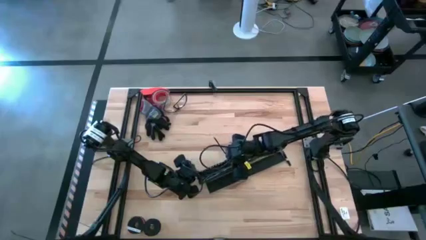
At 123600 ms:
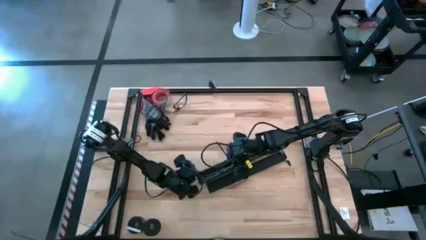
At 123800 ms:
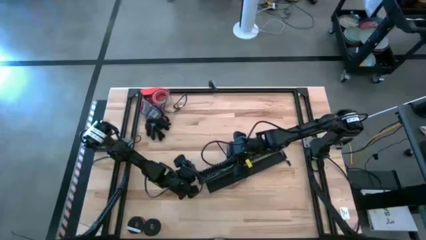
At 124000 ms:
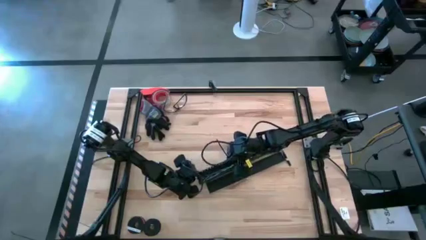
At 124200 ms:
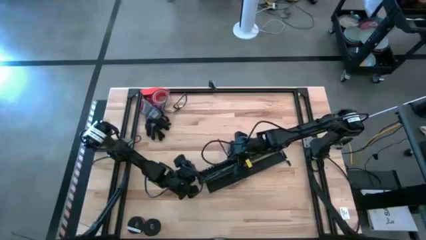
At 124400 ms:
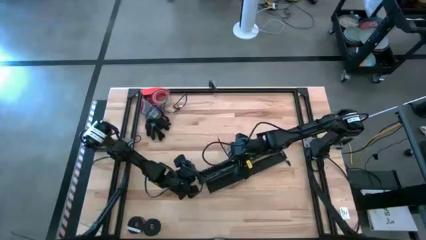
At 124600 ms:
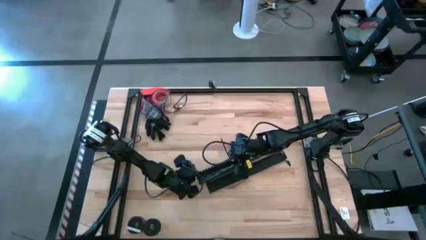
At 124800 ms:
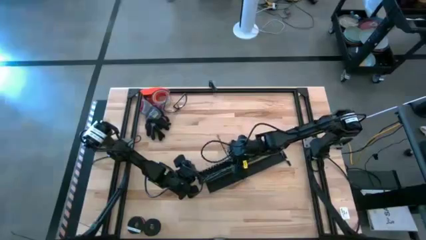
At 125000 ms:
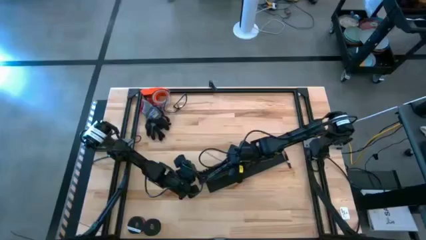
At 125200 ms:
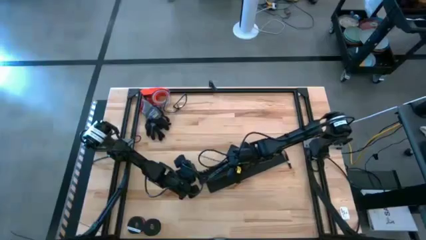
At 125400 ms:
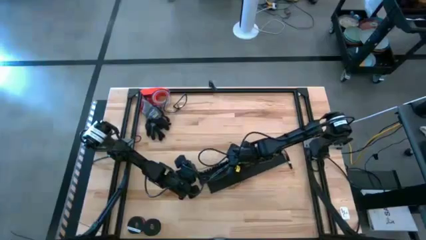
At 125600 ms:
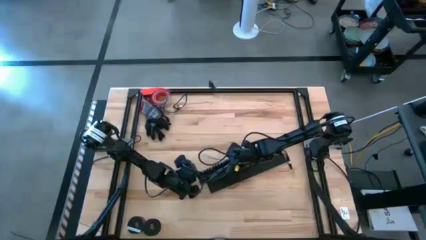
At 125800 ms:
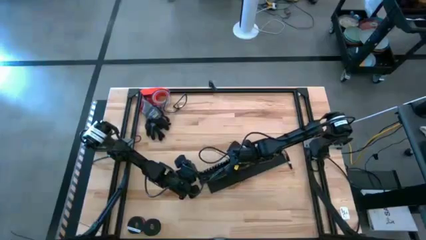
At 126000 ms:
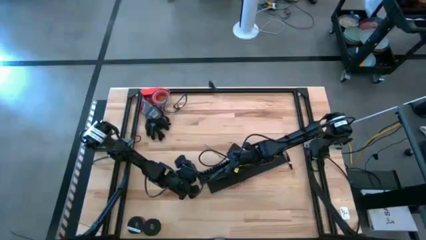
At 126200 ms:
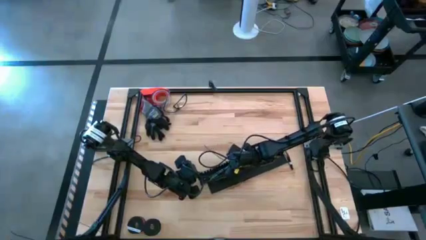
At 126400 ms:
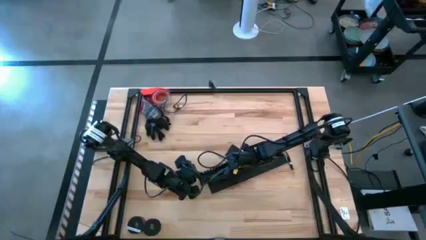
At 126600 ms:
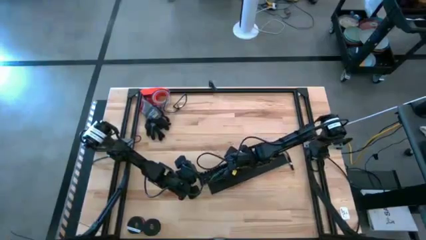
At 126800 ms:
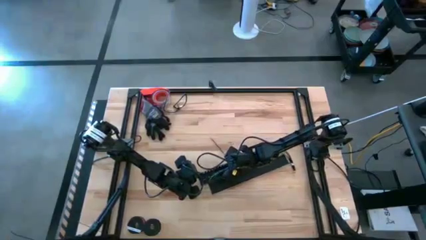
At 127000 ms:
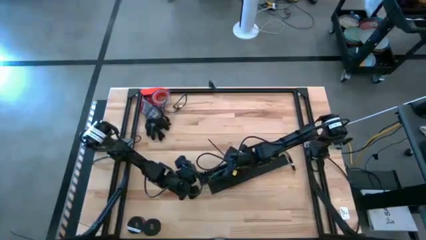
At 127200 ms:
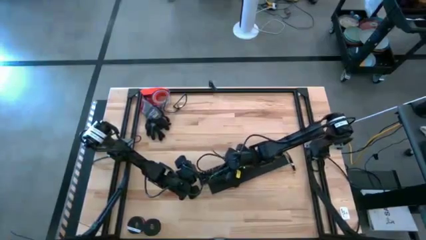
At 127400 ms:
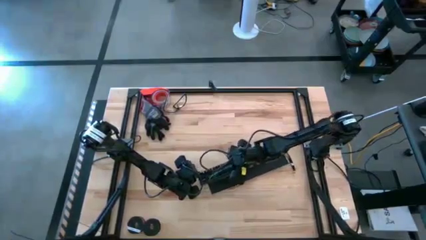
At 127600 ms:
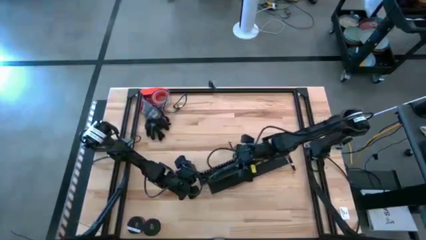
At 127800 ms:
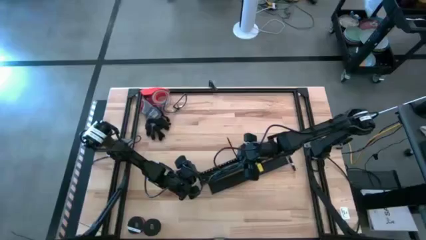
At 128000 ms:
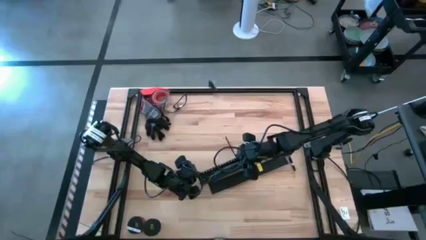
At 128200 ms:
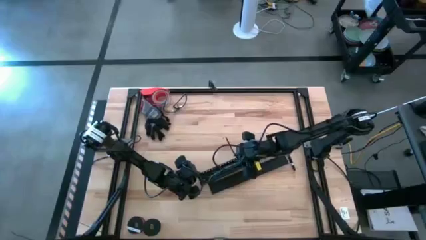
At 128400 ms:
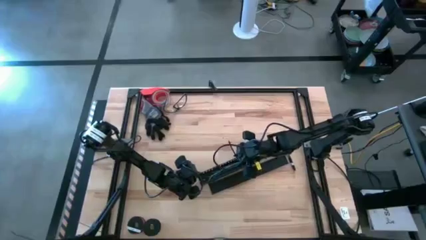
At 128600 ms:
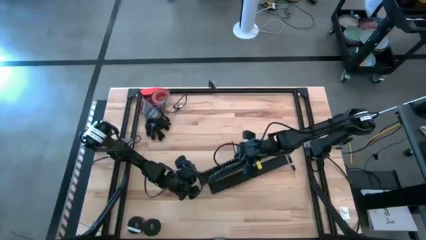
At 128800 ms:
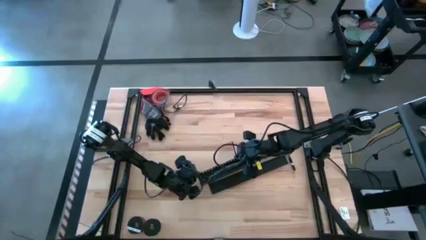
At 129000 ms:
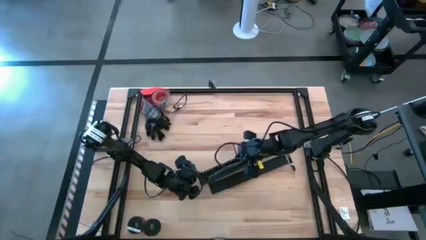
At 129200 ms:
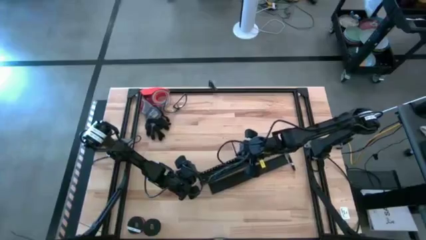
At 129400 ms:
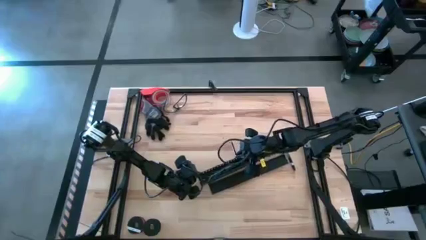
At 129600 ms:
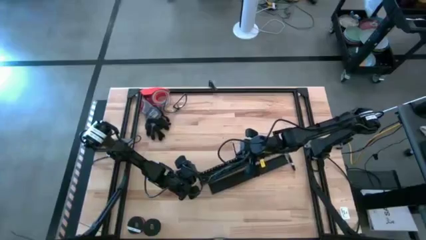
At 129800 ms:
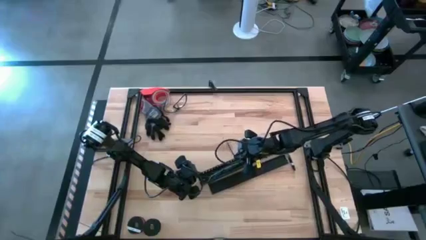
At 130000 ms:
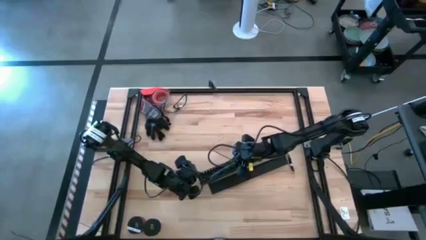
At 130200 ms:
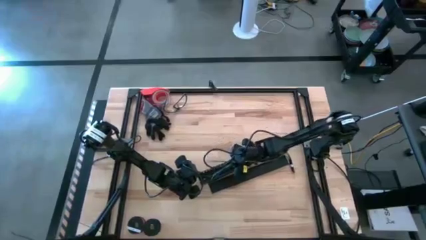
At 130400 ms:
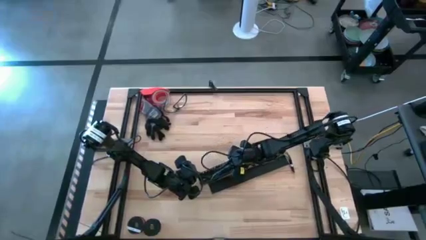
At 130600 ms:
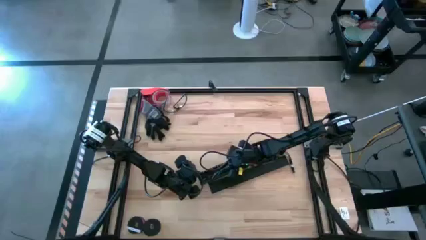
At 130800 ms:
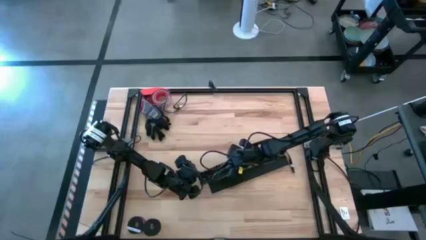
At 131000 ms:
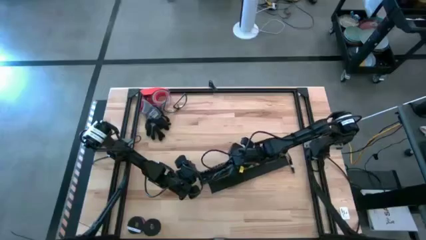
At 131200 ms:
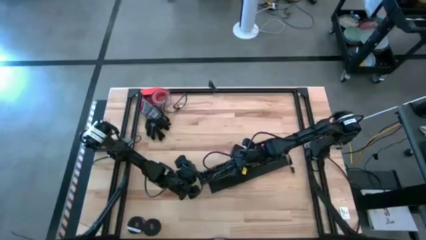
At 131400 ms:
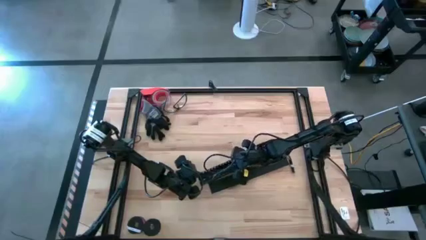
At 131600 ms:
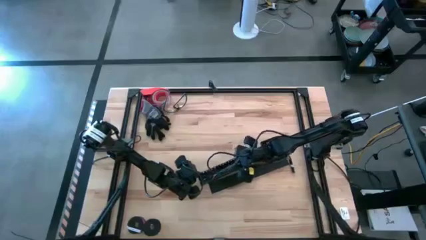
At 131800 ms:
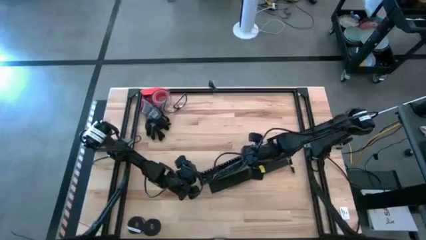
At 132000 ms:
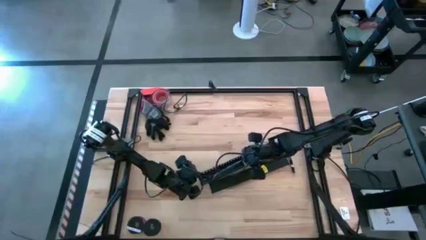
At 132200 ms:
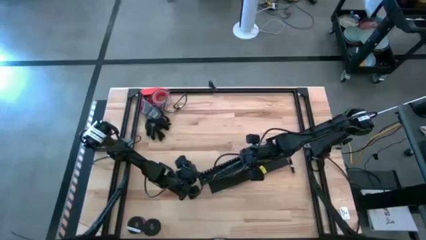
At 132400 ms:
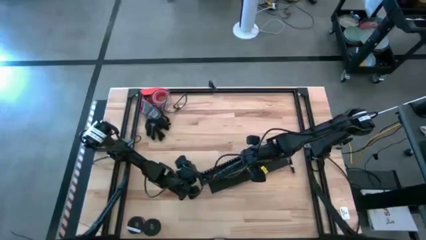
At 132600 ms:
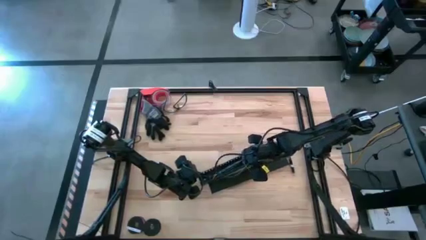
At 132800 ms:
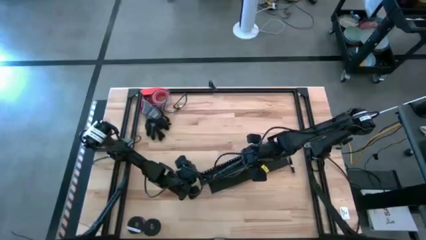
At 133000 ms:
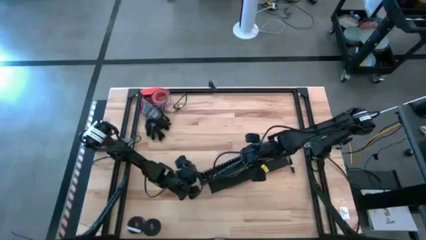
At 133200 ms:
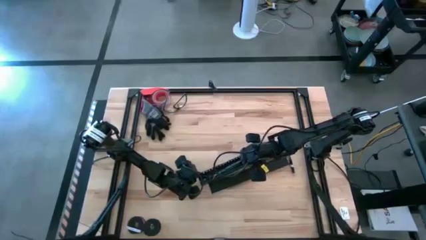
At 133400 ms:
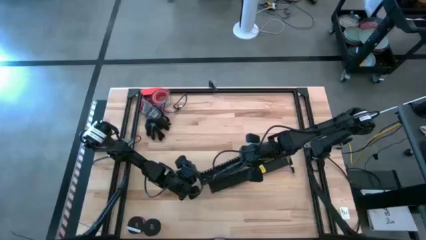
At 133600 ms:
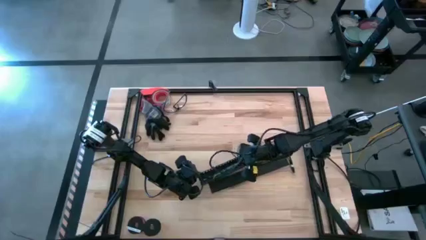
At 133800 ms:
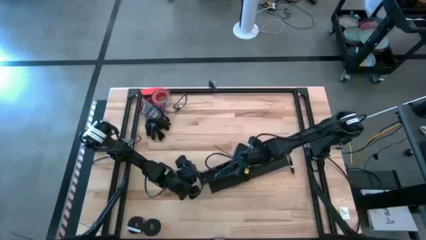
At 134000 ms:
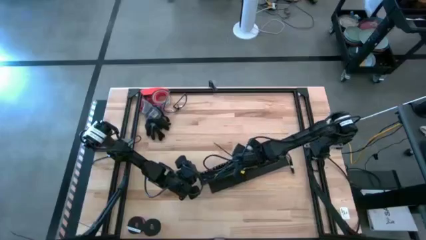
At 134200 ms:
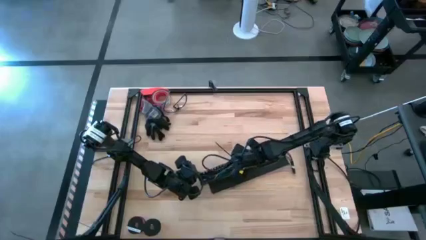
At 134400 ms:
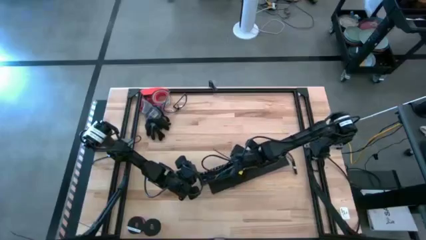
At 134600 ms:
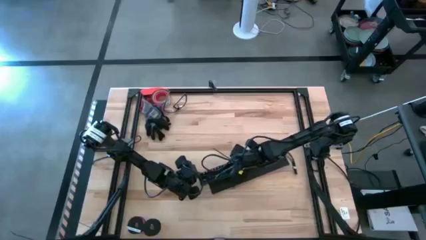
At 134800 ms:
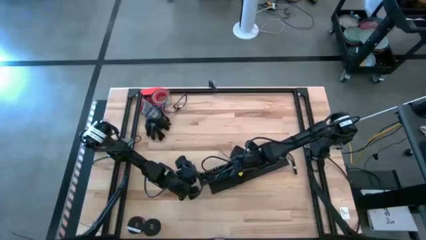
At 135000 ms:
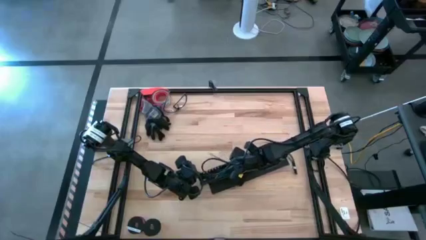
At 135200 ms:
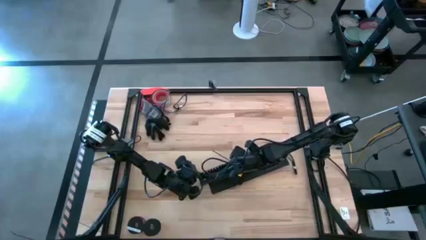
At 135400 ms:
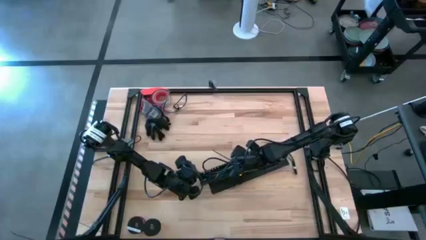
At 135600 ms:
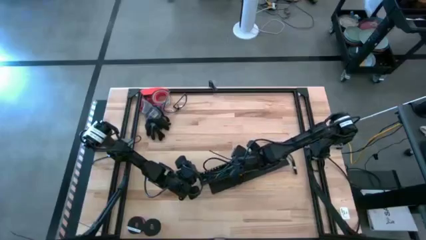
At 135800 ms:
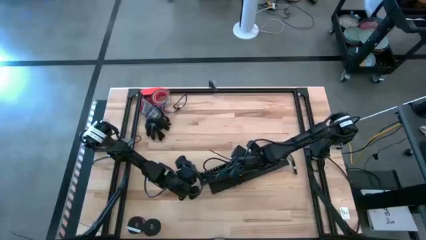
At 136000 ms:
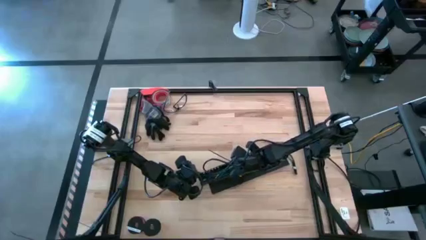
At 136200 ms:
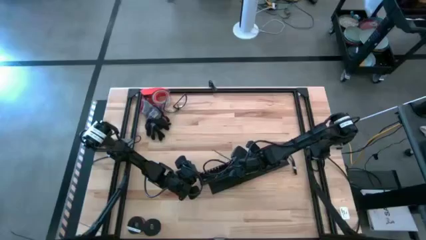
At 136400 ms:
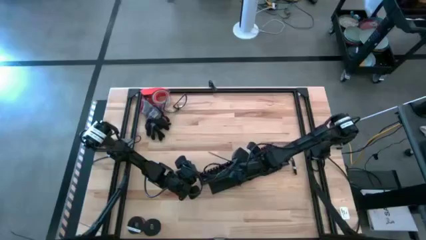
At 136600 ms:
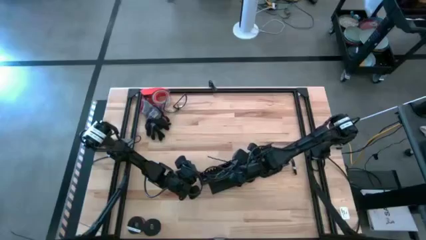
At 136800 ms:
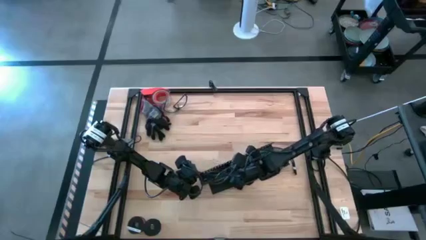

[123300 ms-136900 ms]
Task: Ziptie cables
Put the ziptied cable wires into the black cable duct

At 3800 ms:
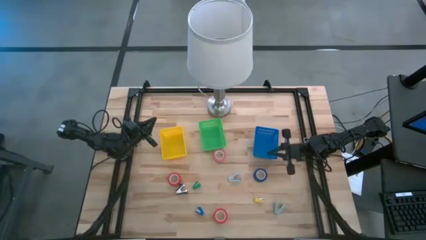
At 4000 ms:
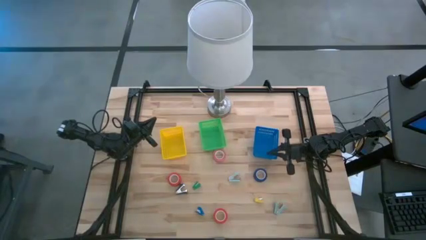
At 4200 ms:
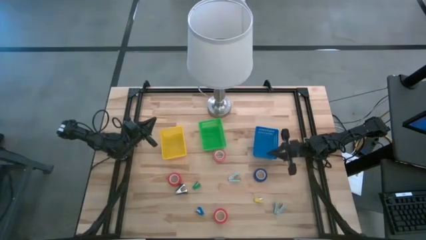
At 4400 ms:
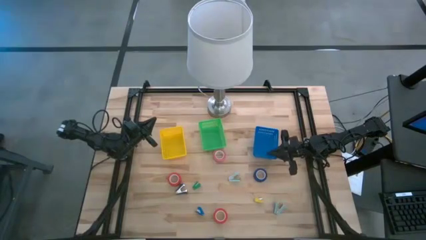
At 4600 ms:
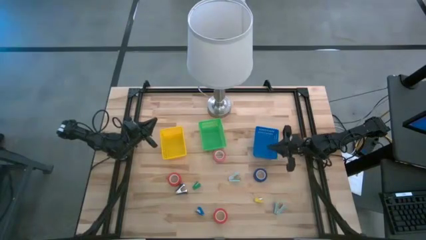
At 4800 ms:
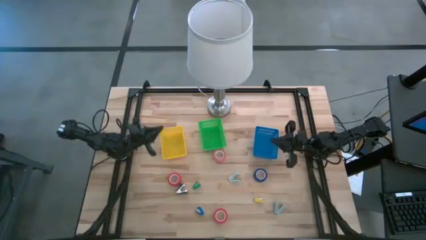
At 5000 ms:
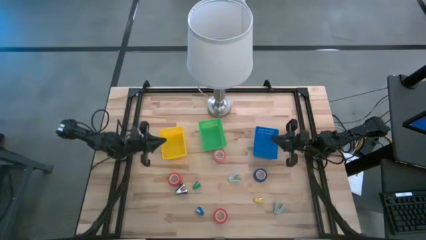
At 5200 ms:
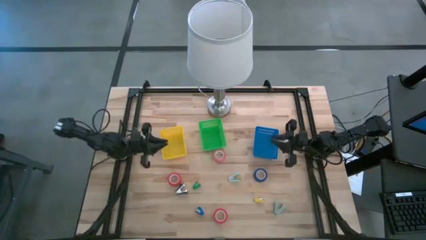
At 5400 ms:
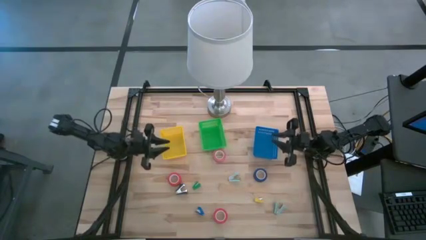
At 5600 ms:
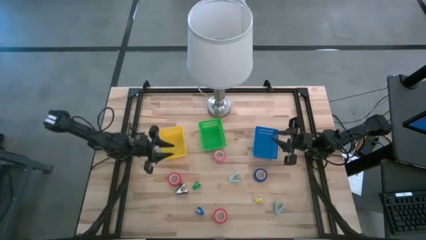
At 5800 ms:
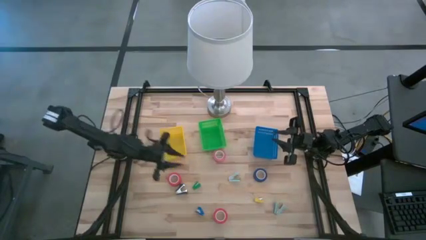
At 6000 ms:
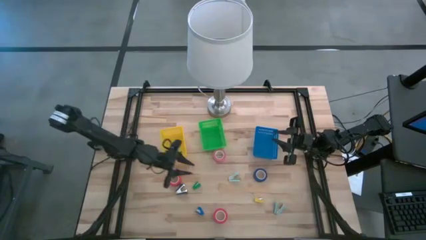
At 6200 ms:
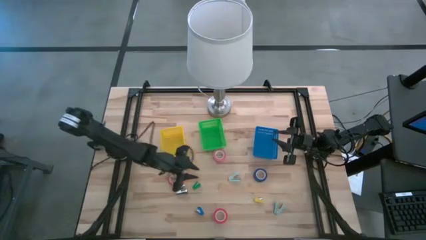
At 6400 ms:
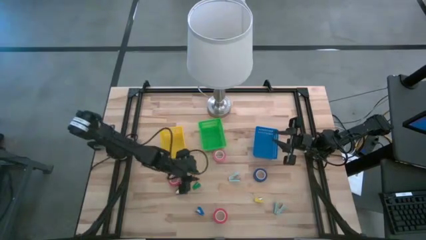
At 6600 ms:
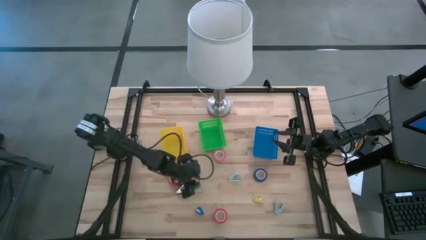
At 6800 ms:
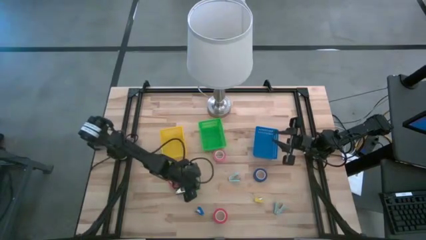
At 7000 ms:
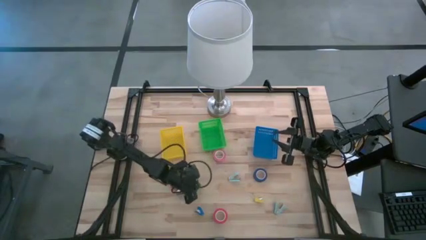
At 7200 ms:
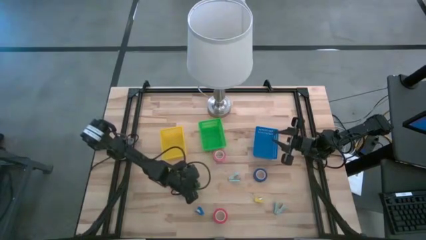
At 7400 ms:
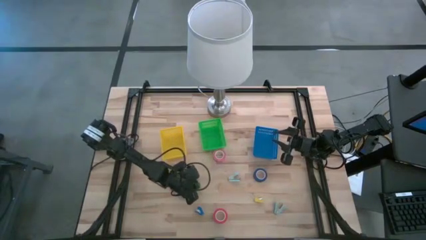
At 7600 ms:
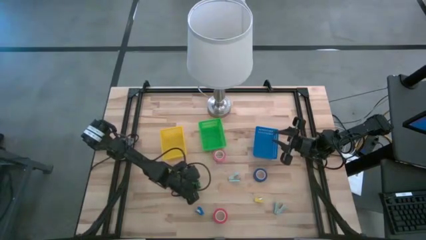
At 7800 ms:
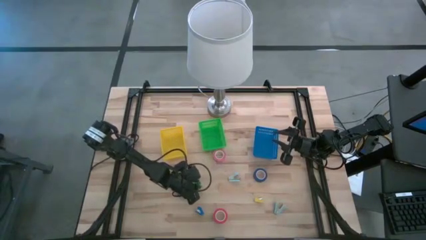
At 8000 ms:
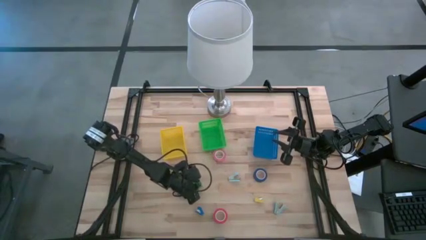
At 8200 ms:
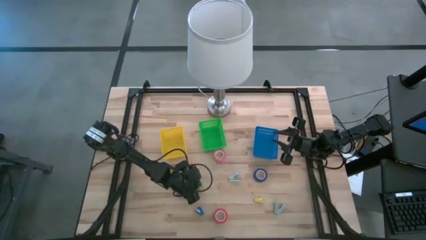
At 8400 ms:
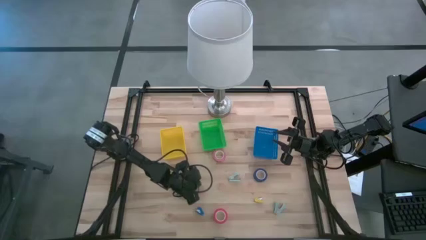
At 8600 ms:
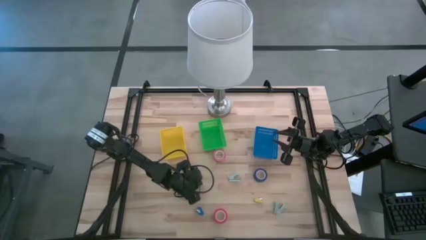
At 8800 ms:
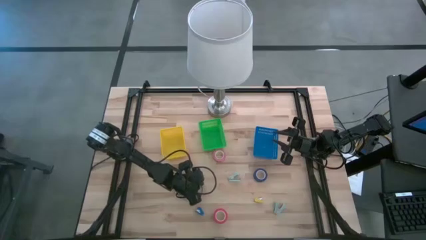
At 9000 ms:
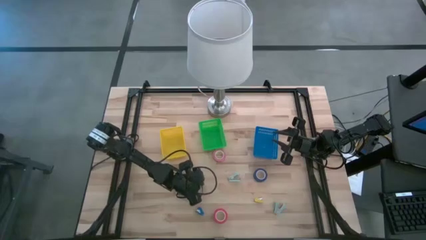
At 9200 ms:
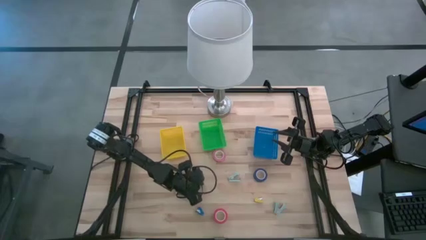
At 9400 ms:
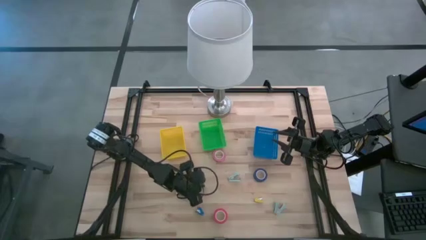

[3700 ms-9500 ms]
Task: Pick and place Stapler, Stapler remover, tape
Put the green stapler into the yellow bin
